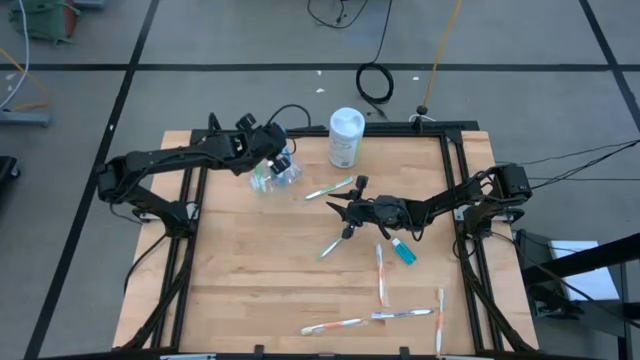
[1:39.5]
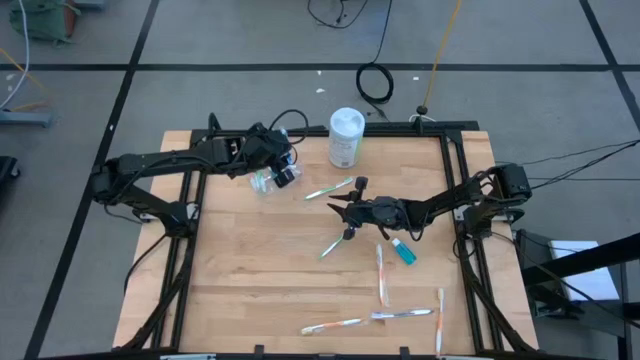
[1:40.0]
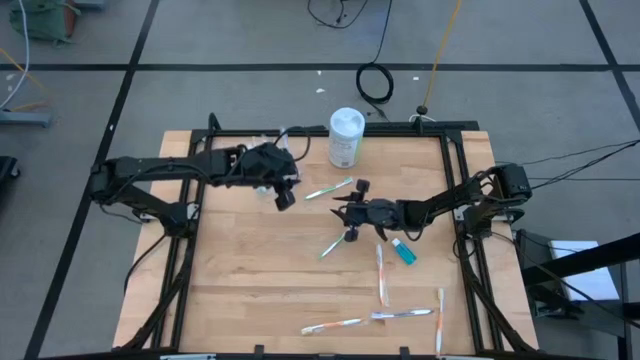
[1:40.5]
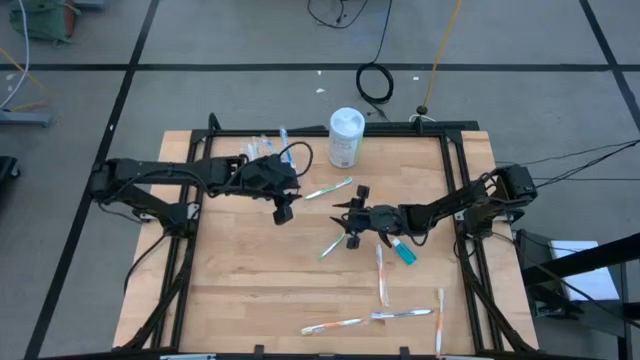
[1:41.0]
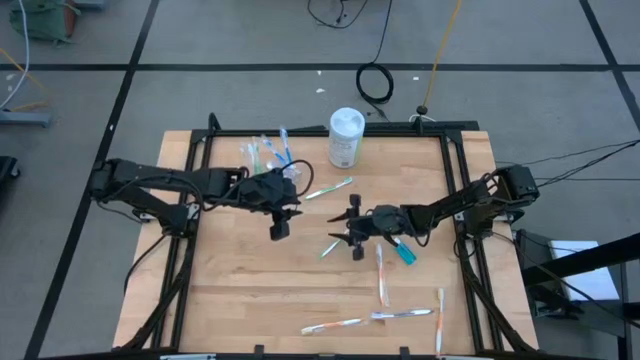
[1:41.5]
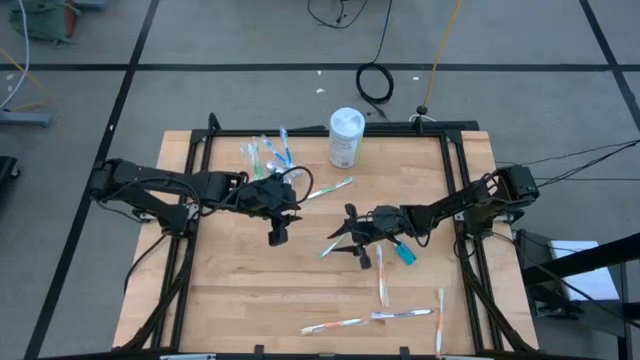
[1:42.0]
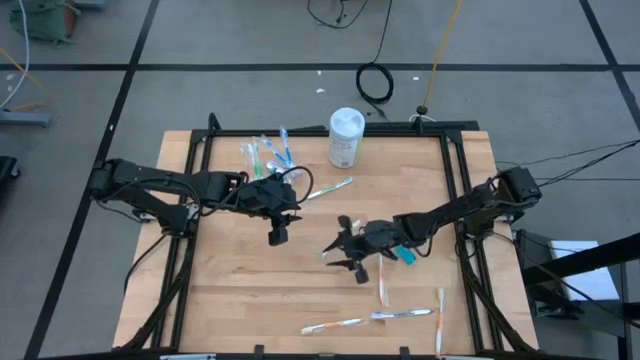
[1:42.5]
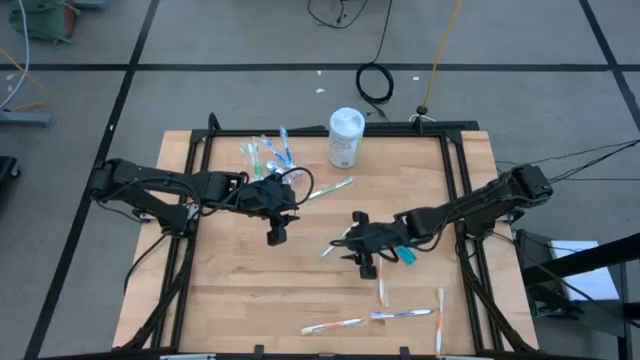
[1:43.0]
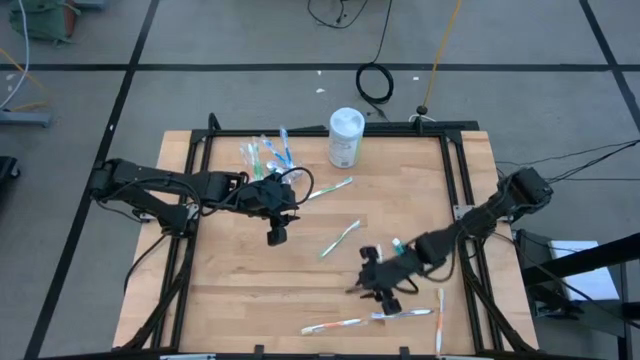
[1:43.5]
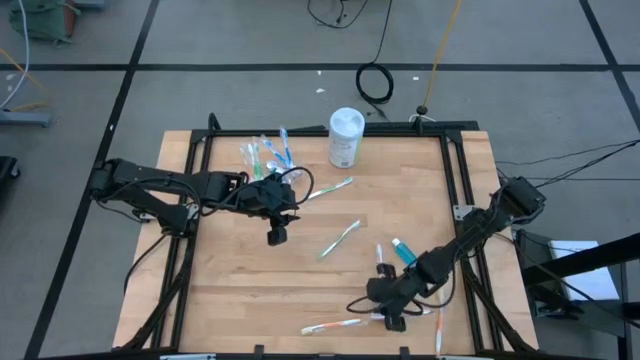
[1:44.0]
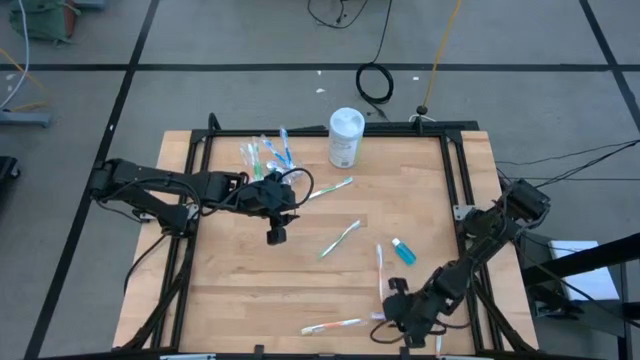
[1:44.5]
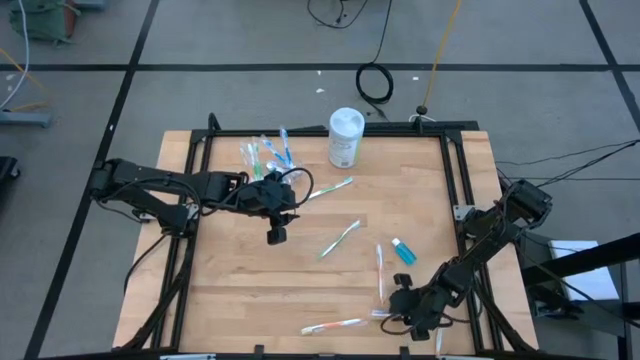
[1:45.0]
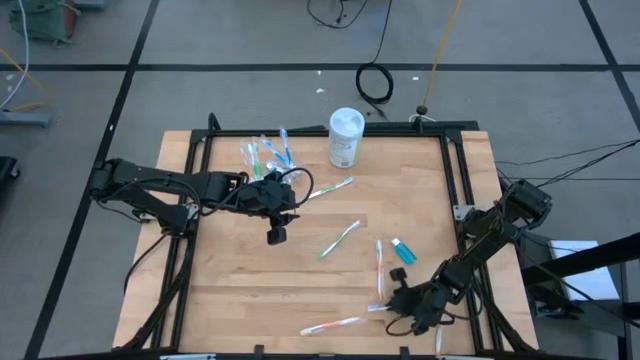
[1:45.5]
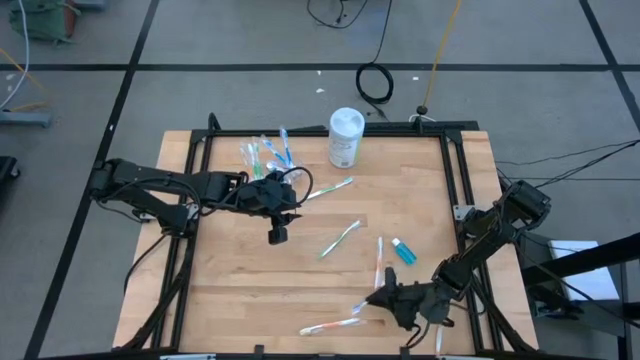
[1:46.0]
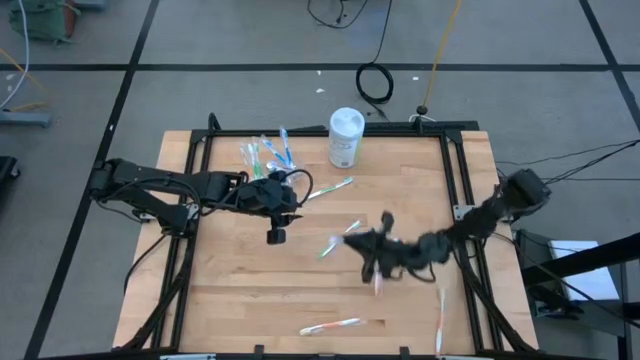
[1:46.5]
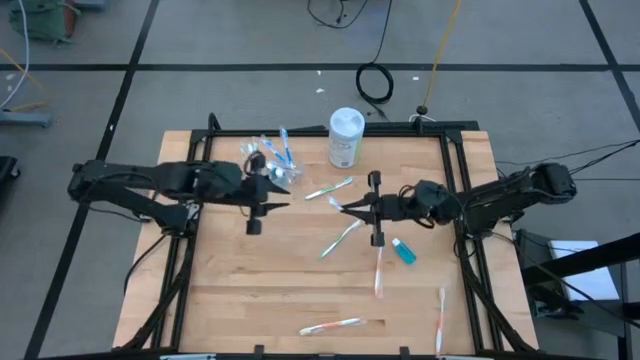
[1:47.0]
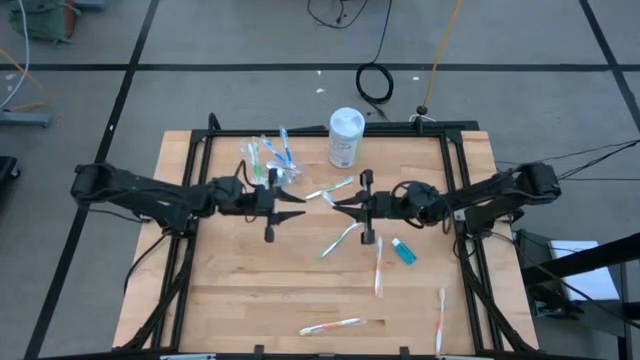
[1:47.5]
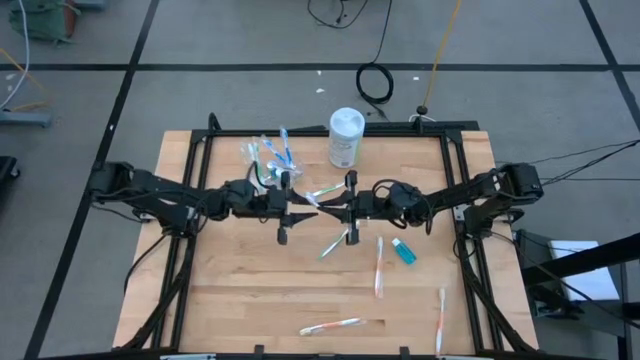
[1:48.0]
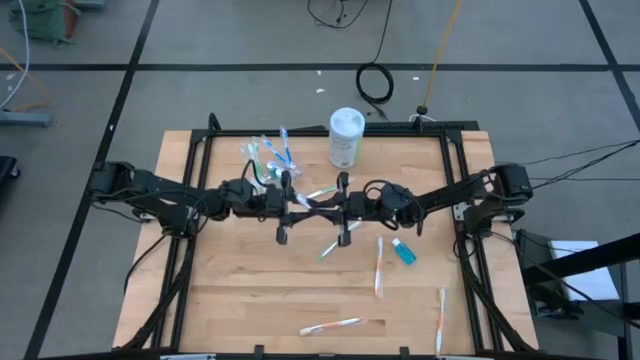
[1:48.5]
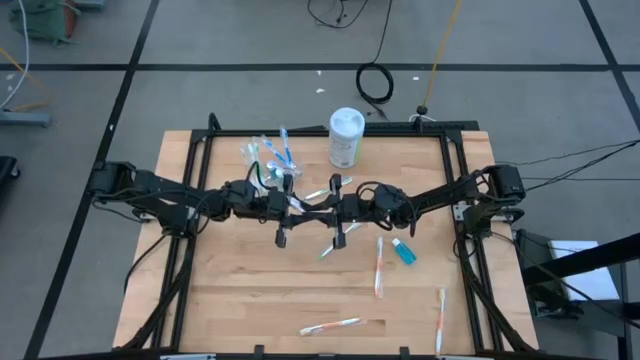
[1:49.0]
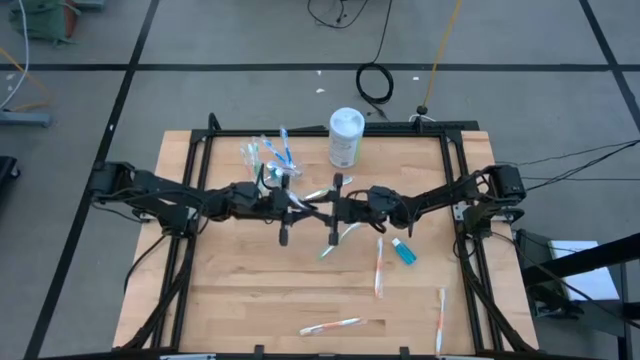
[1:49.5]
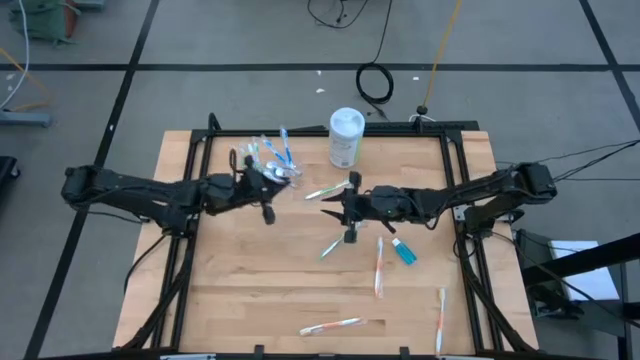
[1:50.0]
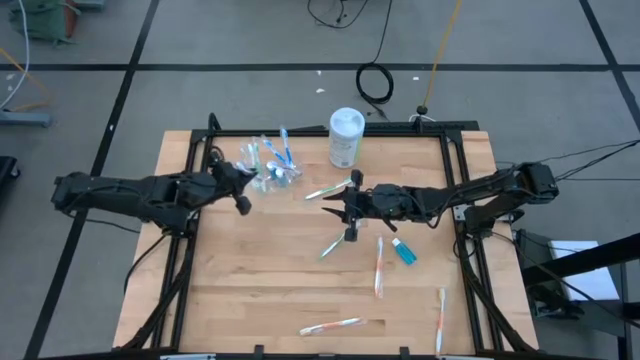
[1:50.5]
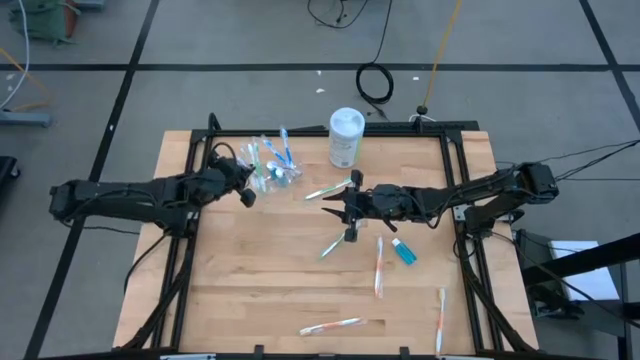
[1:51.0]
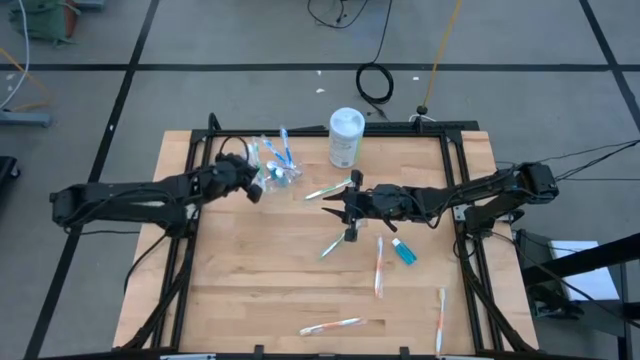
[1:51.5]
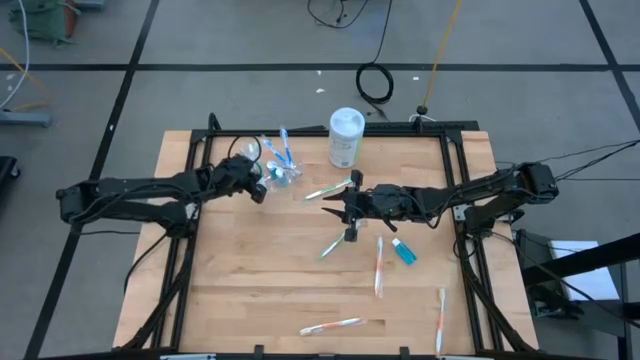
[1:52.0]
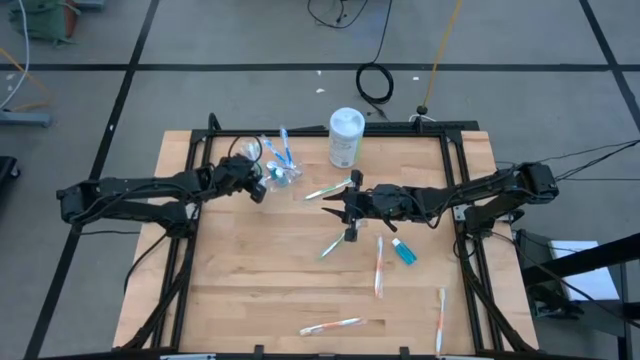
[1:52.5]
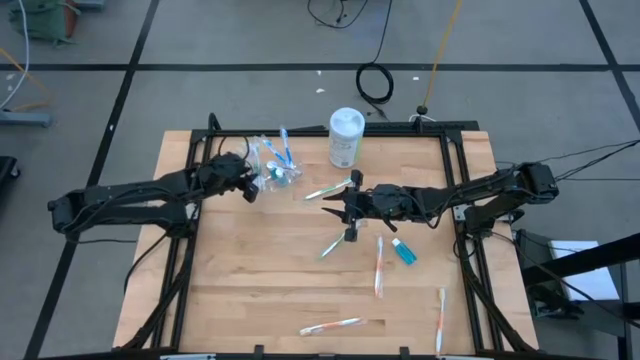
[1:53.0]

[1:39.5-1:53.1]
Task: Pick & Place toothbrushing station
Put the violet toothbrush into the left of the transparent organizer

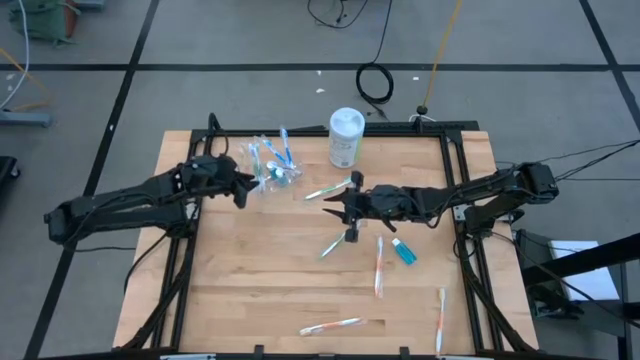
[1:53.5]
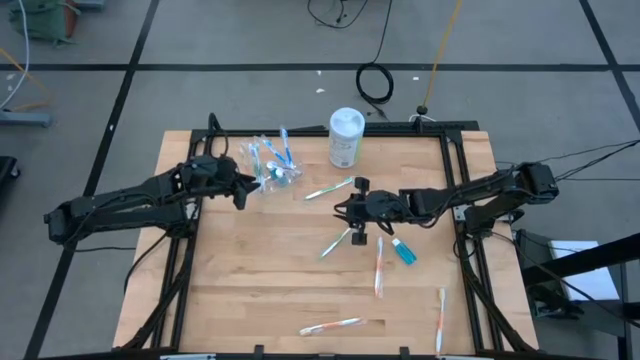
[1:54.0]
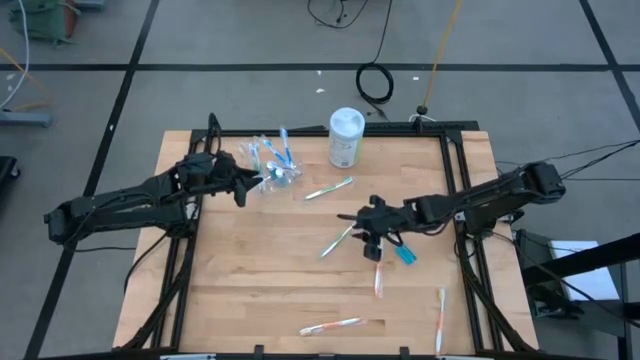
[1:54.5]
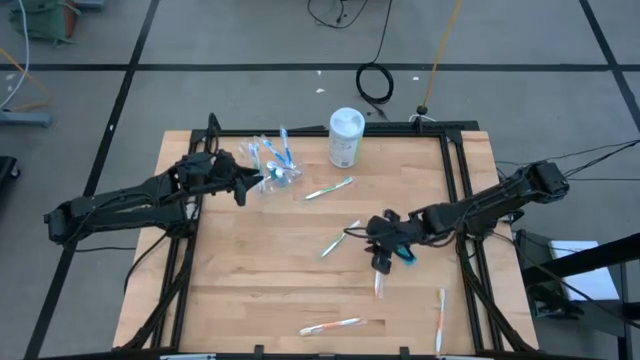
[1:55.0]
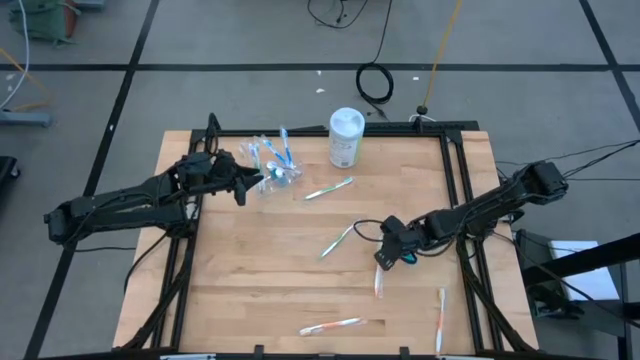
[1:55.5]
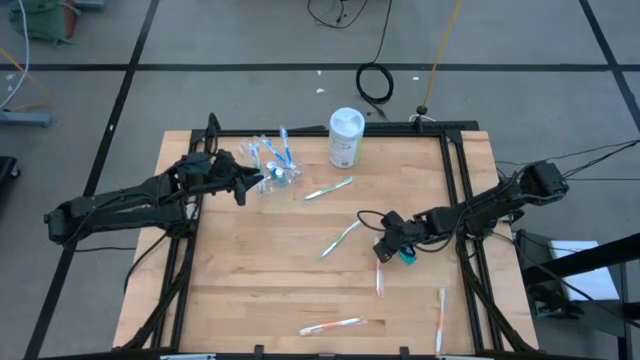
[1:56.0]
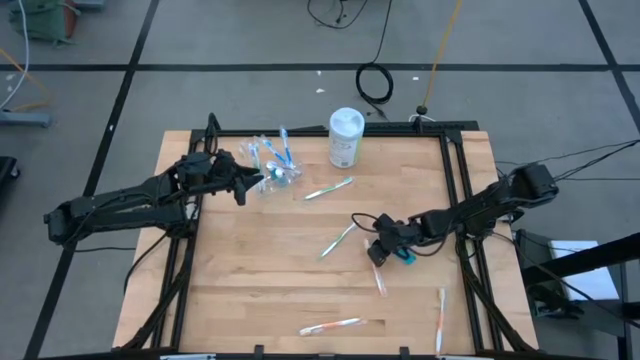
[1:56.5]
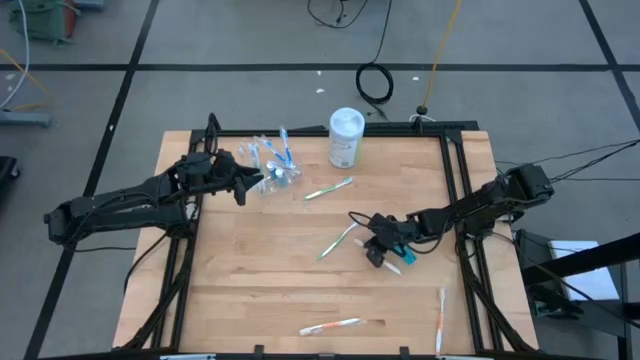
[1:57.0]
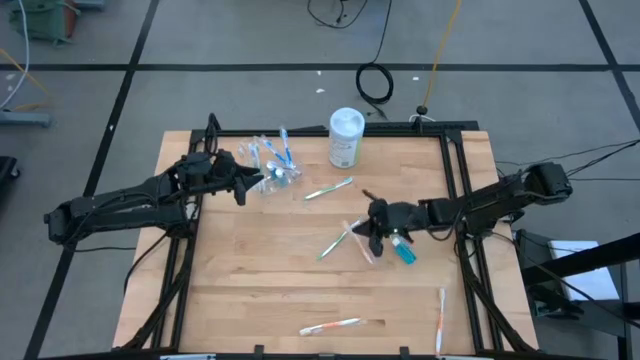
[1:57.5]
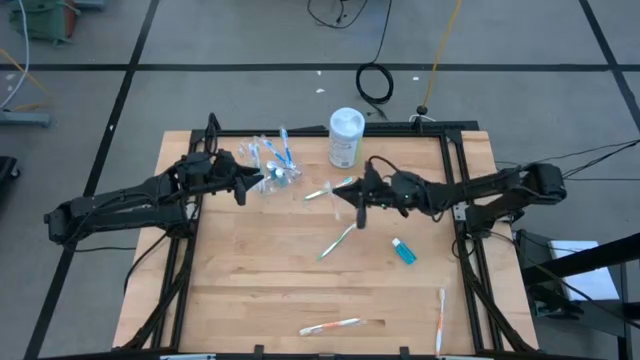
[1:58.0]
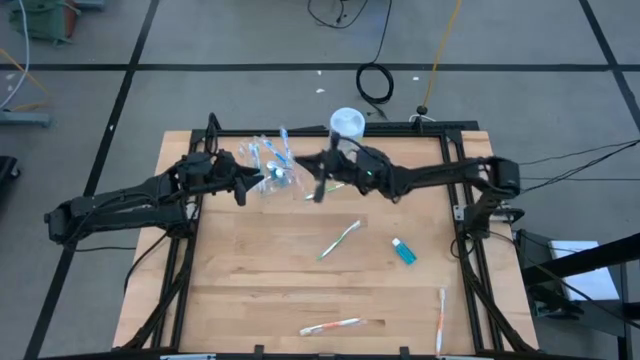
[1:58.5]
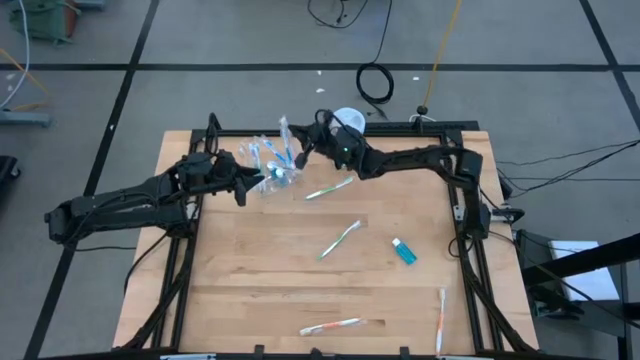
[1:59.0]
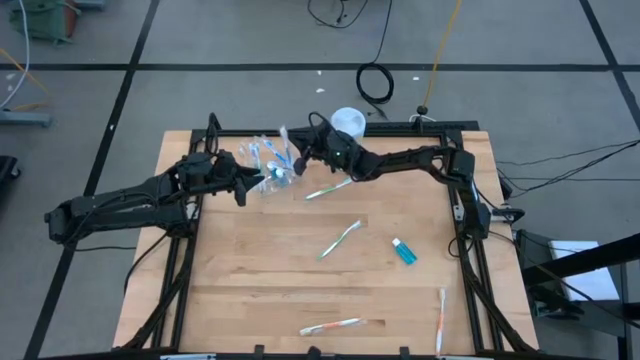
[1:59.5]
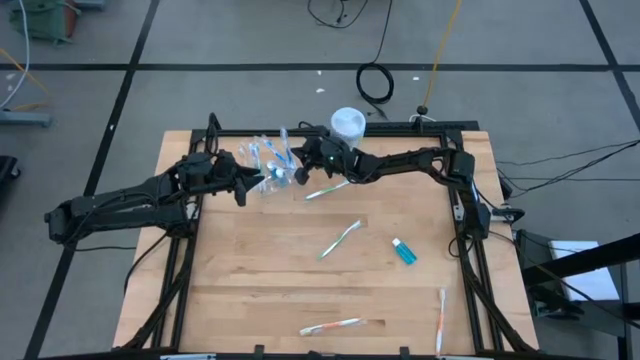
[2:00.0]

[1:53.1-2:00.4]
Put the orange toothbrush into the right of the transparent organizer
